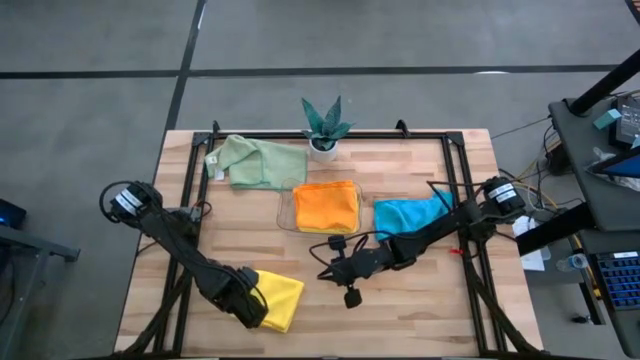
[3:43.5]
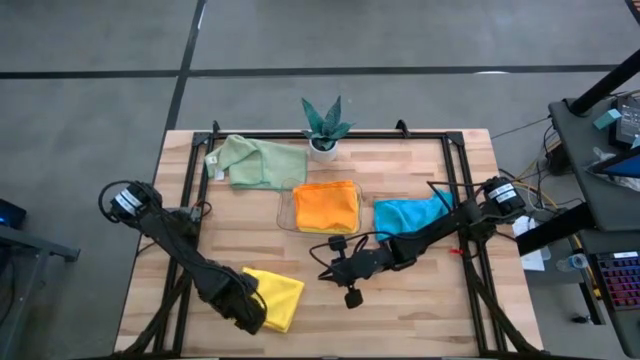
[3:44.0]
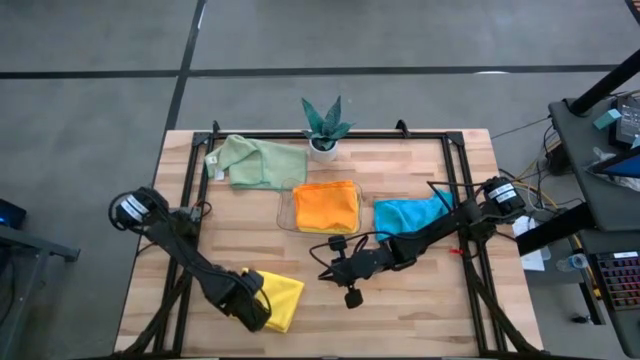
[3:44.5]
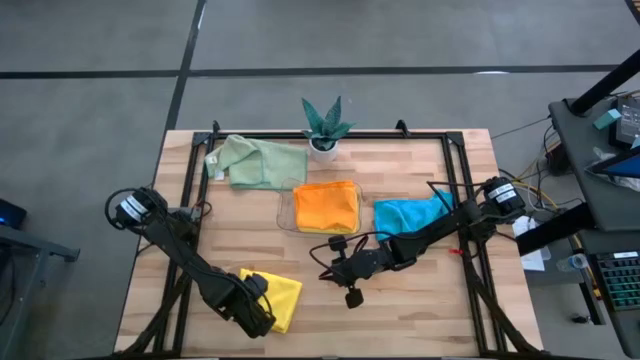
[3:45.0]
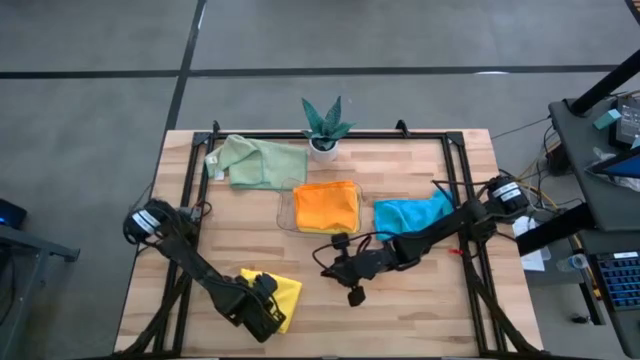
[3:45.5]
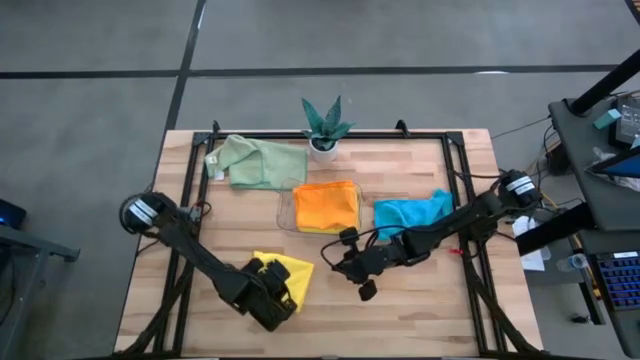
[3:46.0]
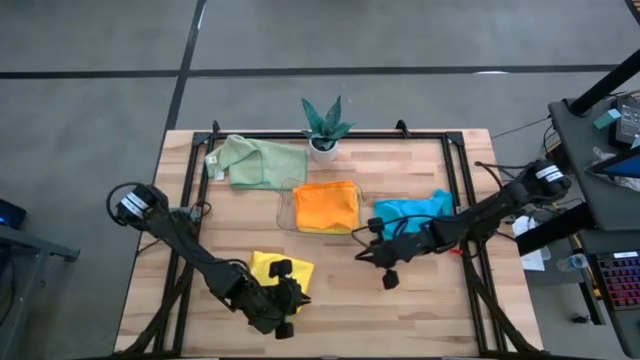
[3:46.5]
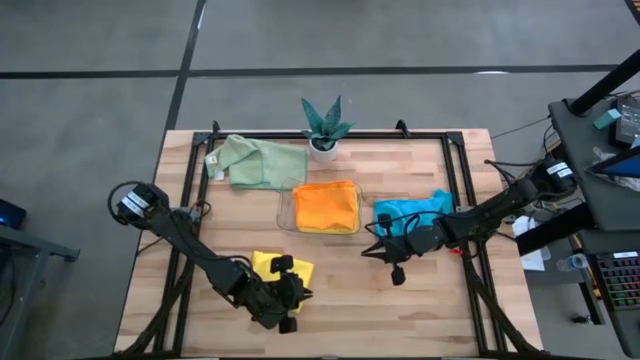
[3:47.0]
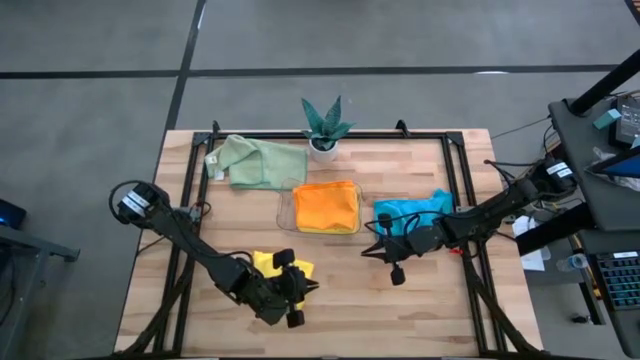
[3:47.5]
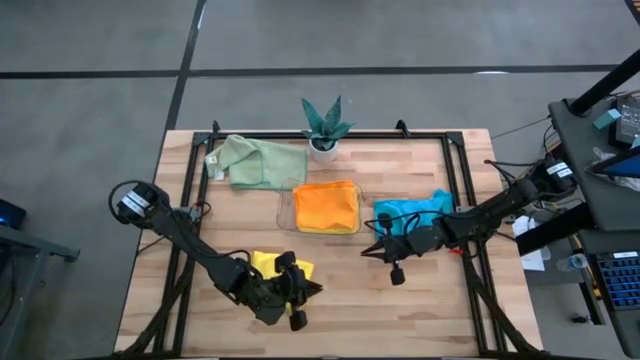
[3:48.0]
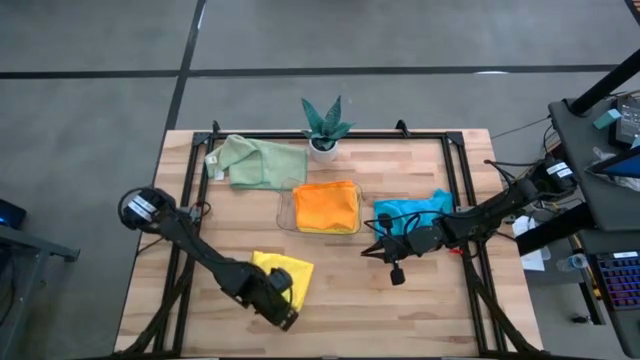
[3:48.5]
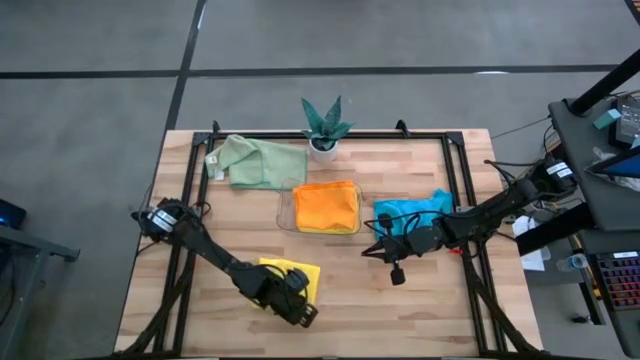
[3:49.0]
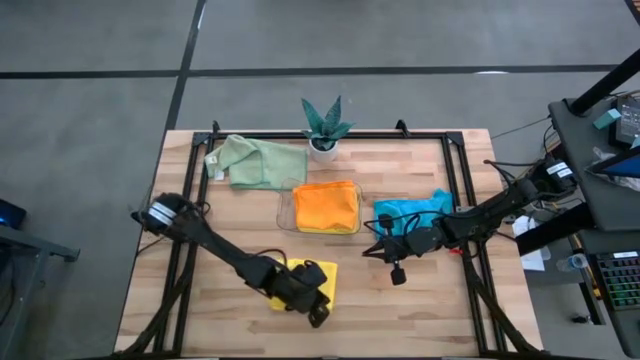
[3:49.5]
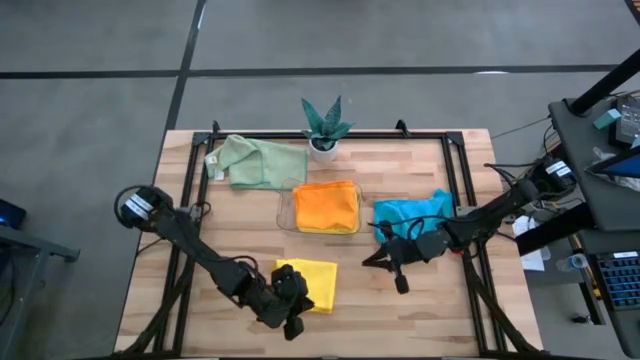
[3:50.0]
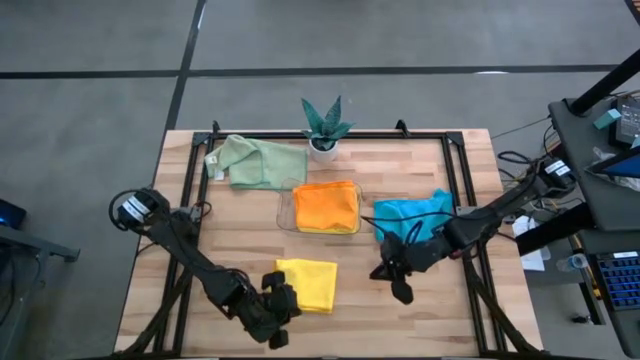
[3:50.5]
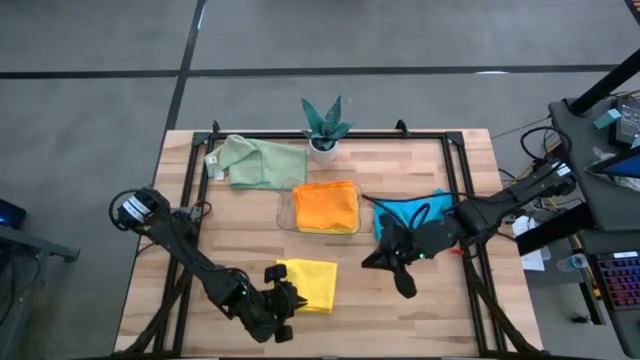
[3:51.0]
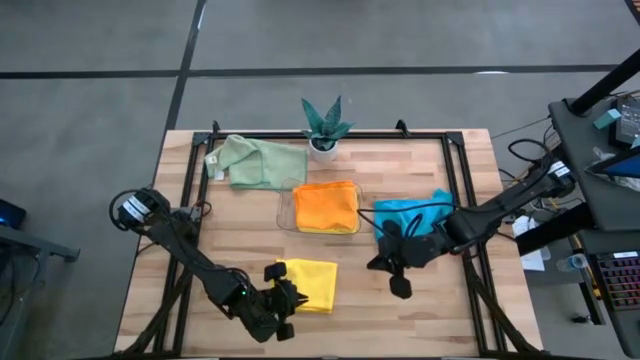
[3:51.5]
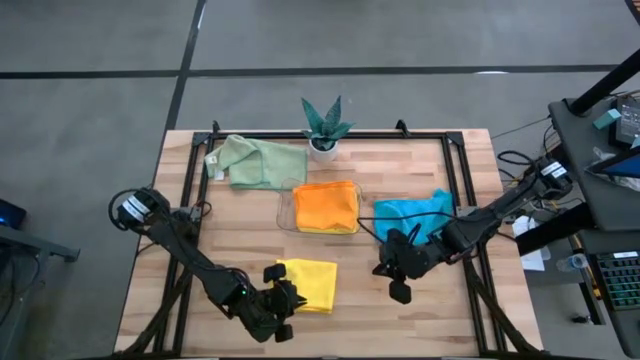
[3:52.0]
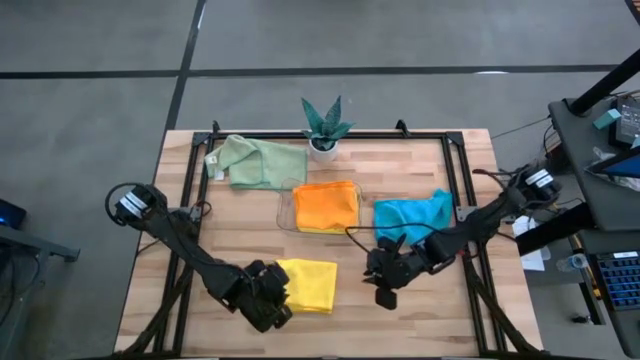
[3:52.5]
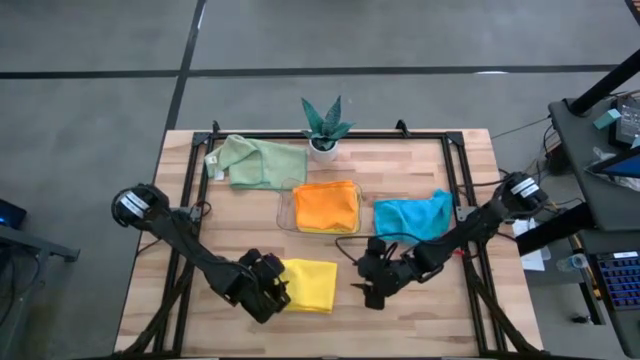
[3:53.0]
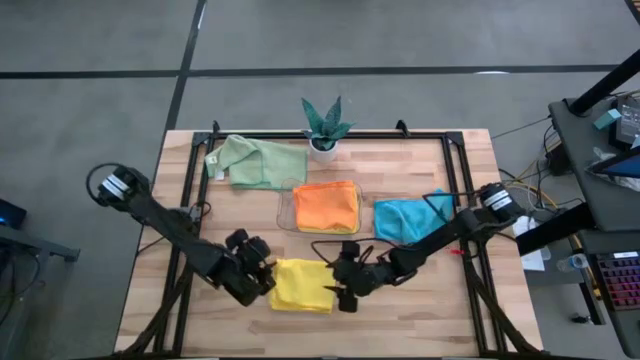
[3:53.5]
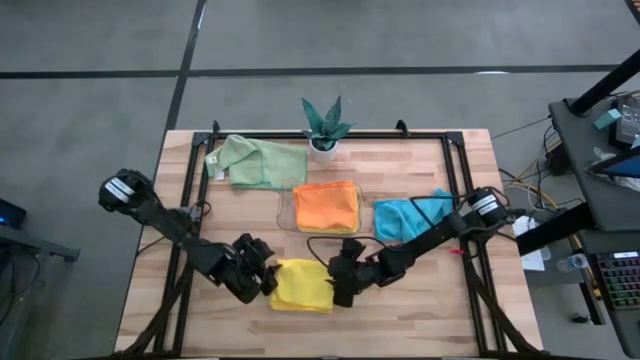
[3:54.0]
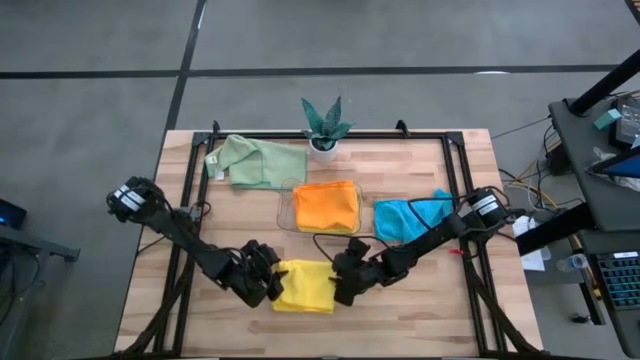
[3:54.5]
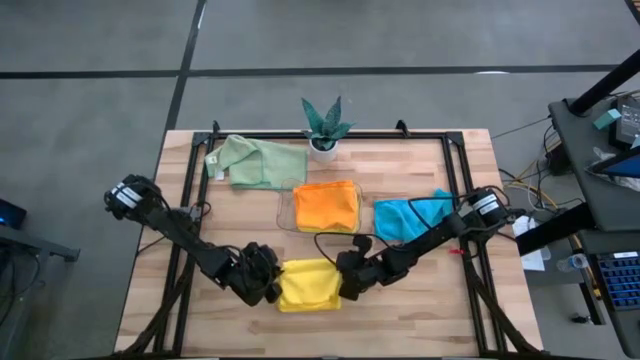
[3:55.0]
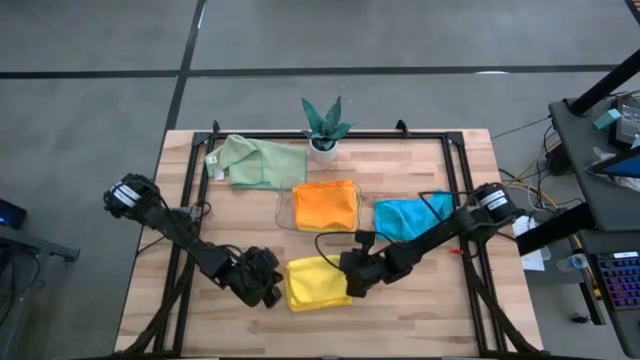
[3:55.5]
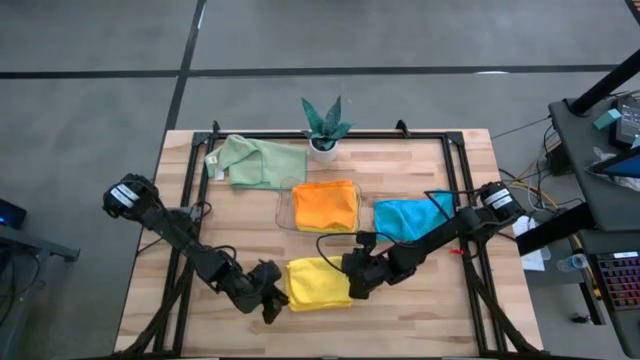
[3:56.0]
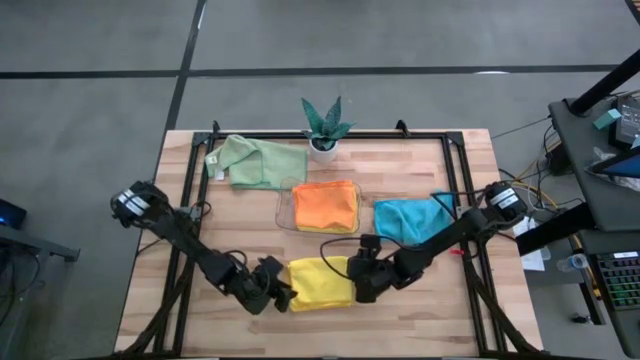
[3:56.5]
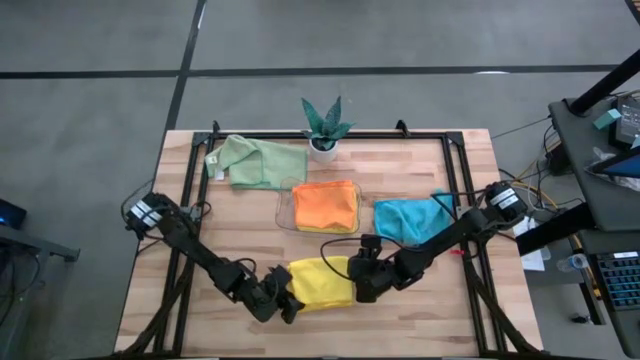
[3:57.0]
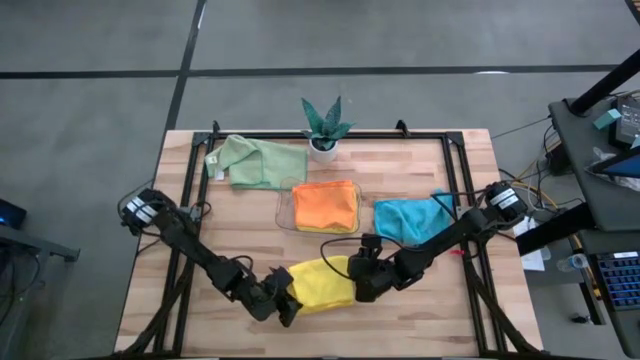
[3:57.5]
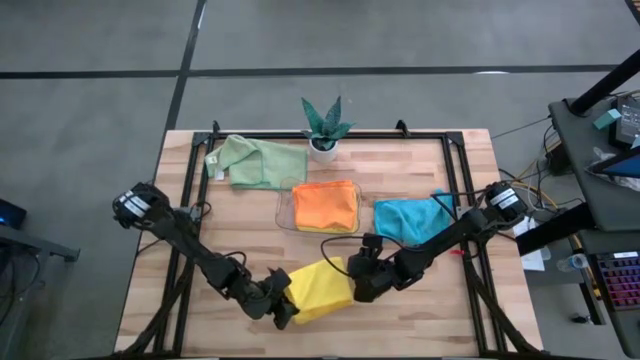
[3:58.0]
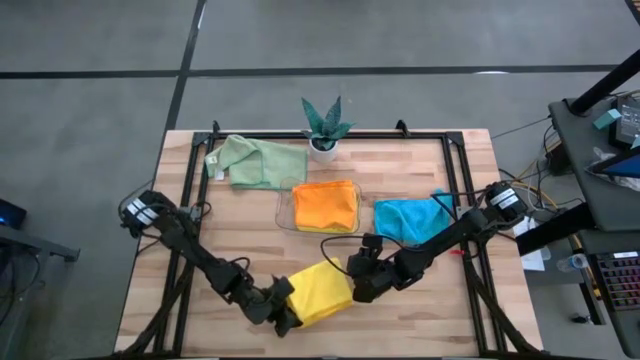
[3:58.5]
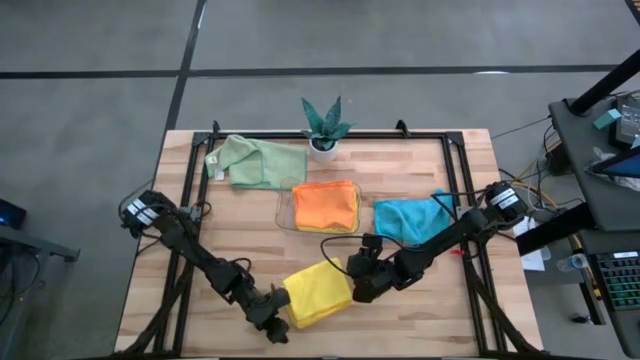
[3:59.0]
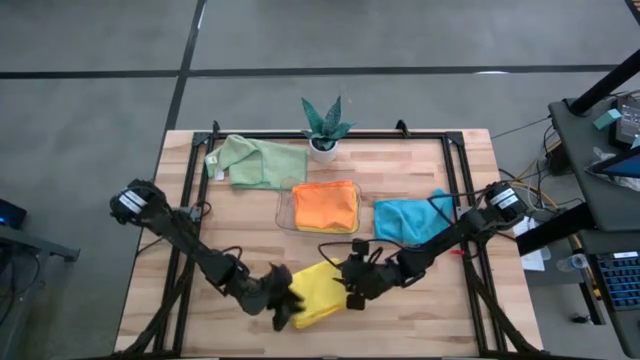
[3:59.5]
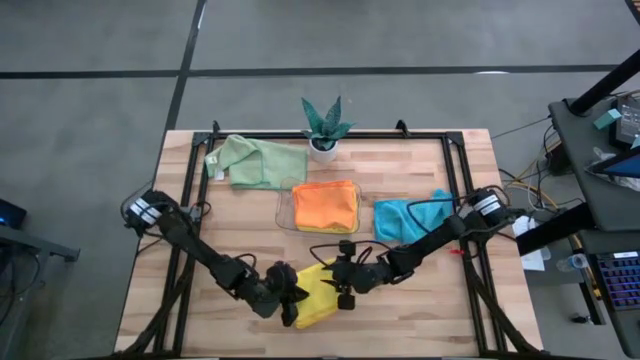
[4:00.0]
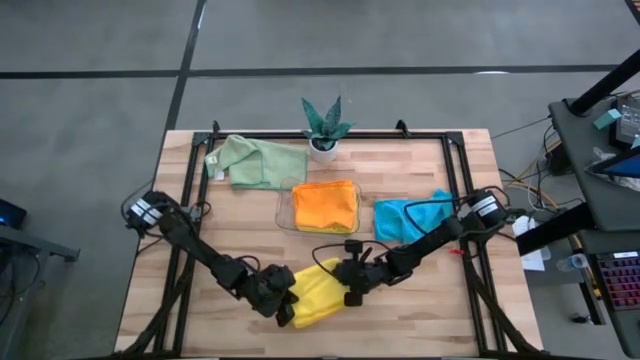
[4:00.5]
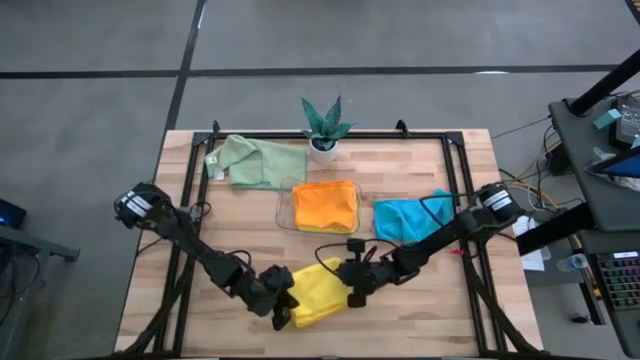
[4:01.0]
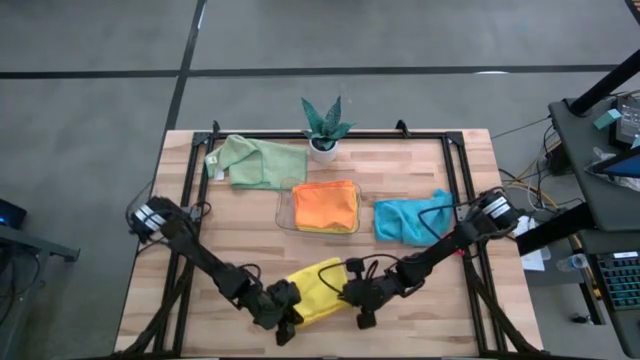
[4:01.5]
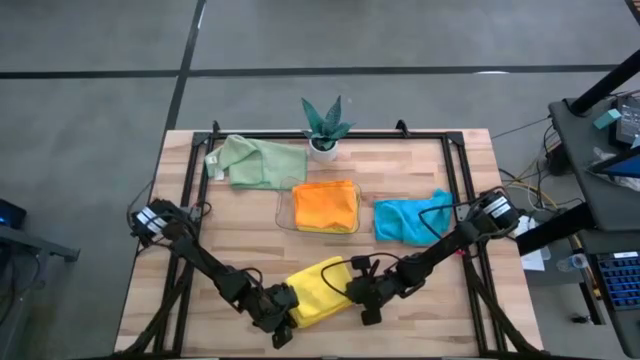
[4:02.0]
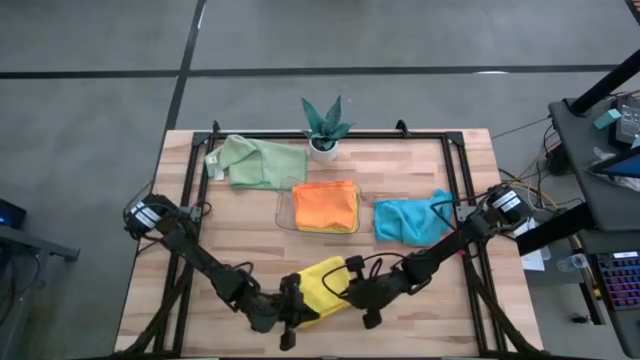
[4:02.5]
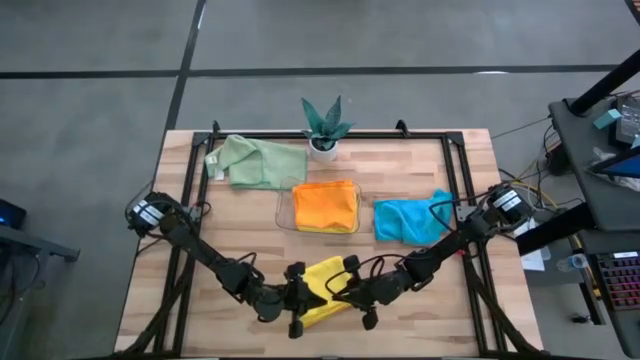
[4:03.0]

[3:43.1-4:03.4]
Task: Fold microfiber towels
Fold the yellow microfiber towel
